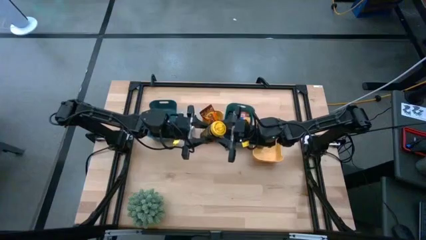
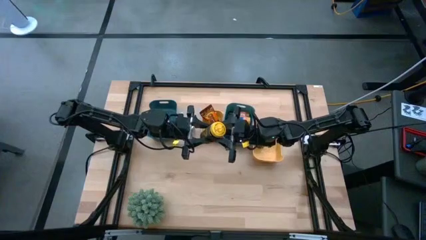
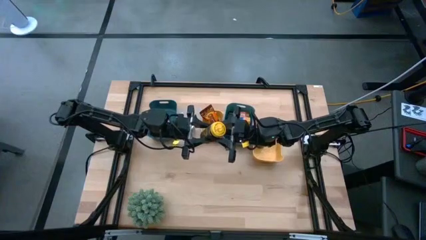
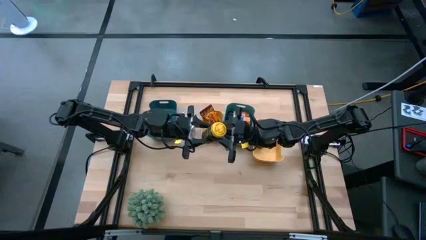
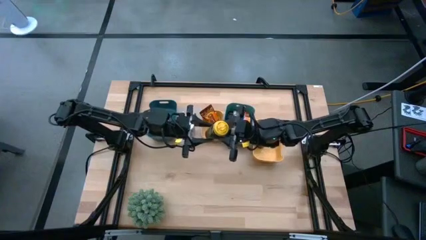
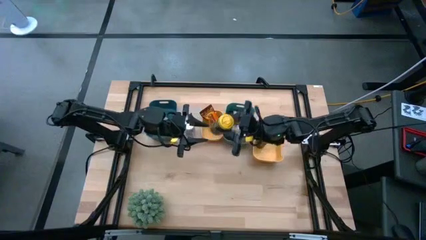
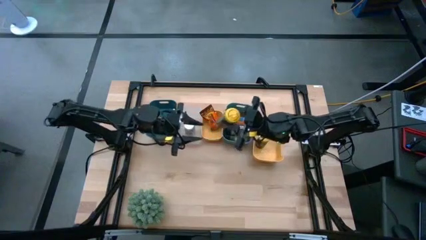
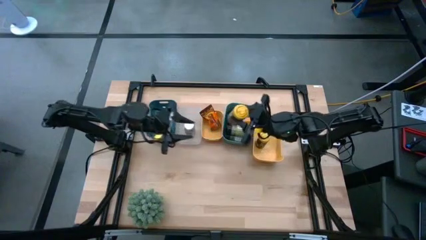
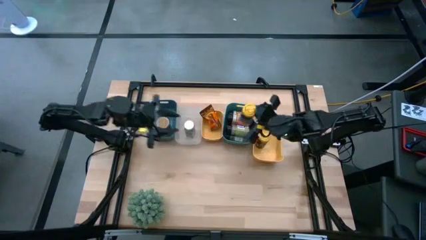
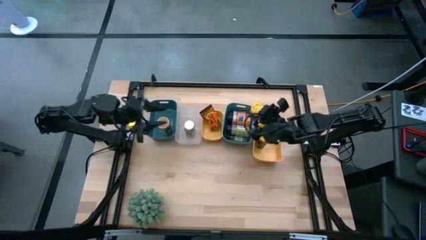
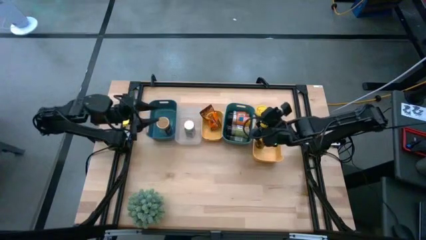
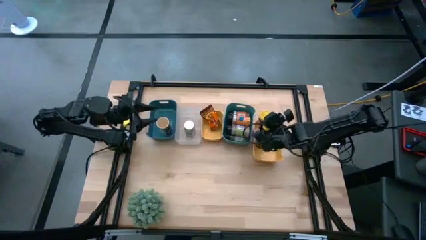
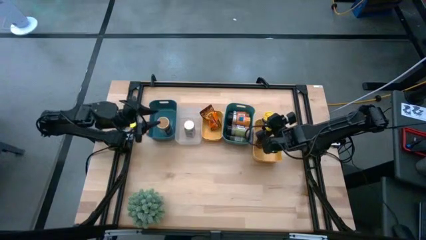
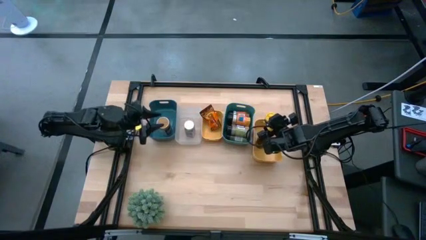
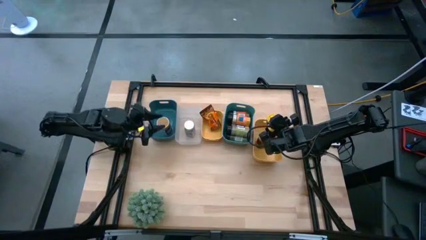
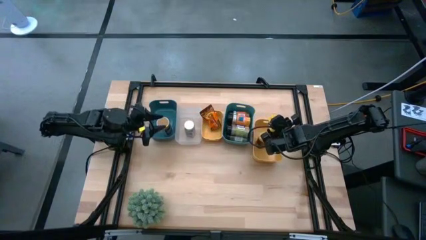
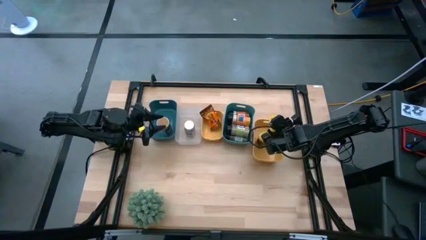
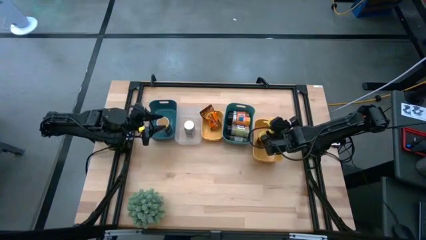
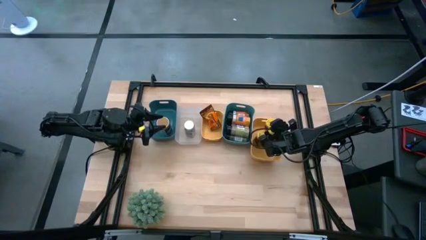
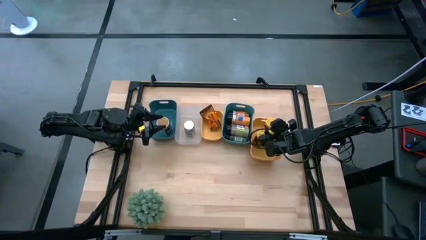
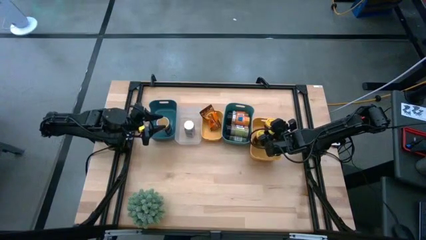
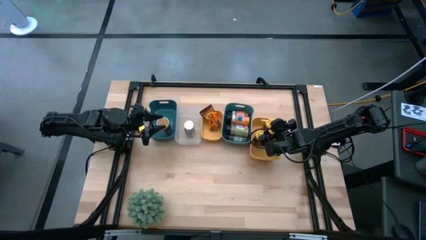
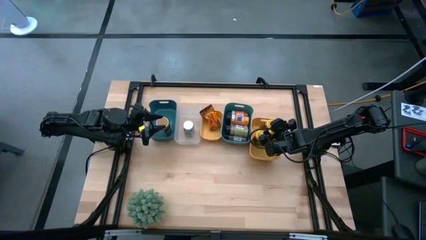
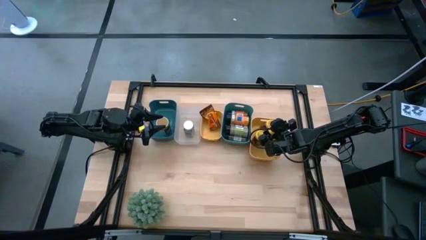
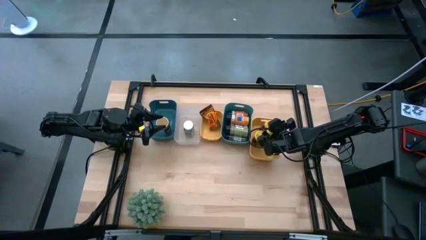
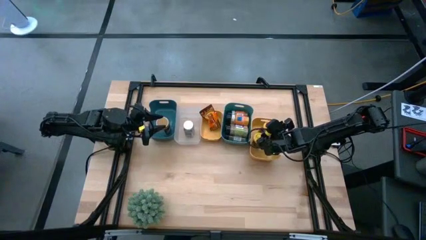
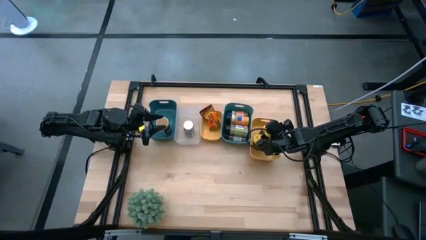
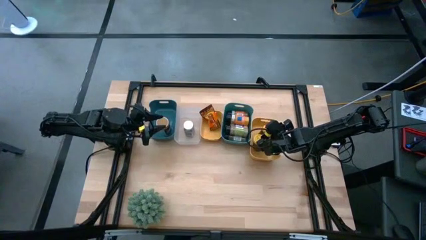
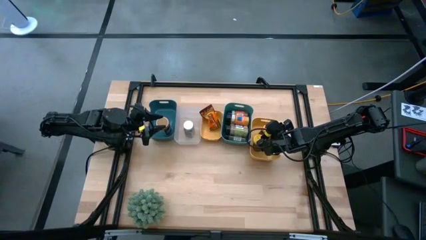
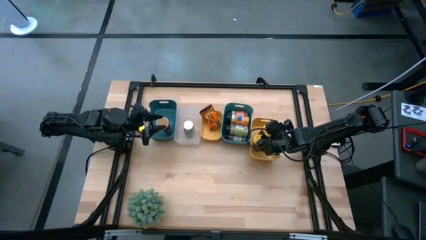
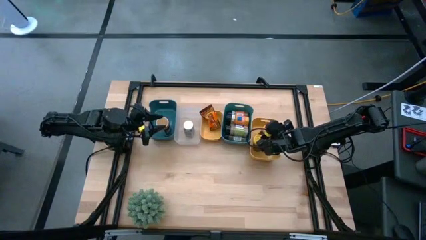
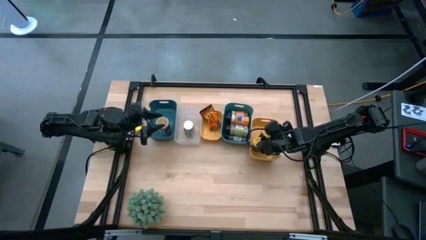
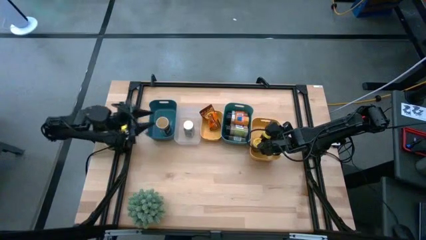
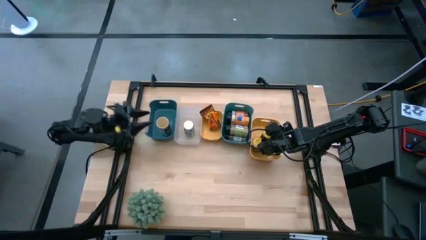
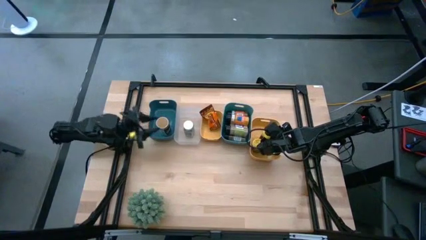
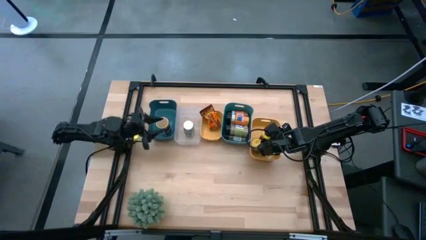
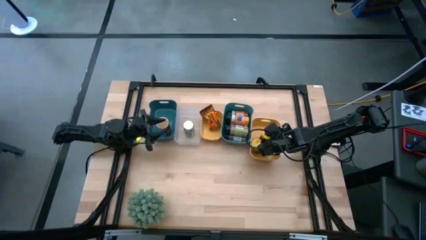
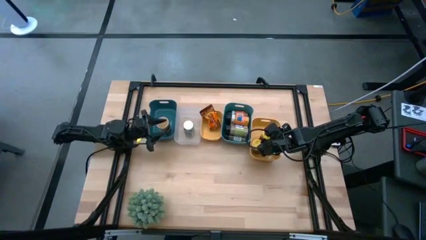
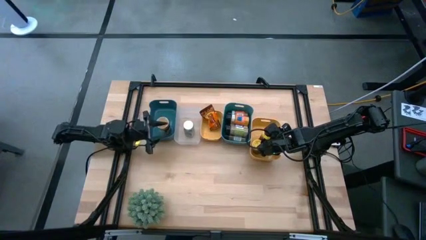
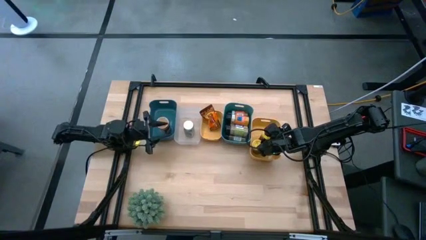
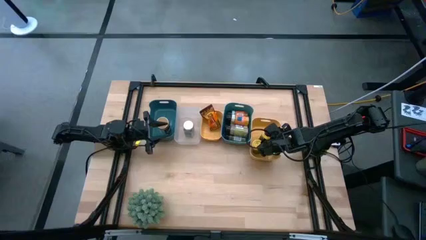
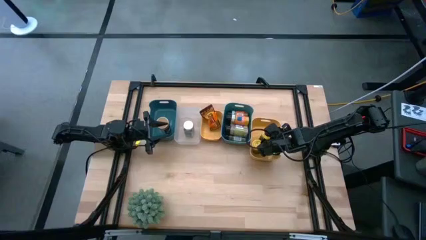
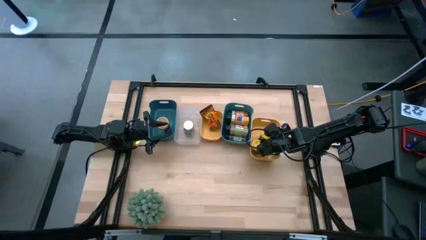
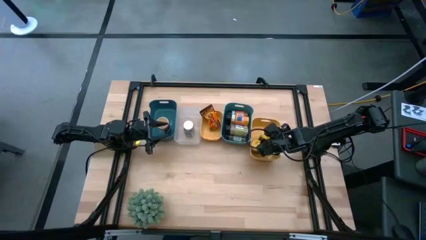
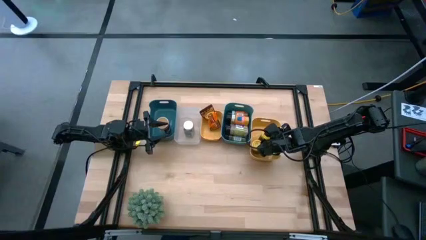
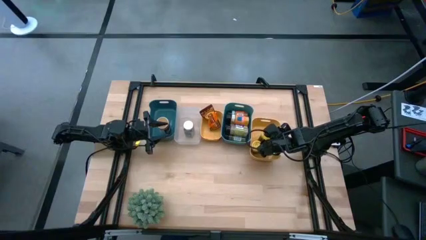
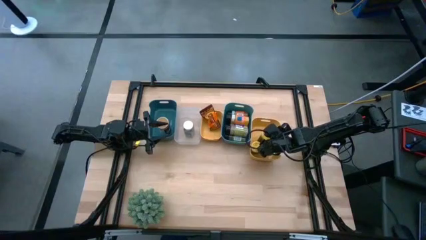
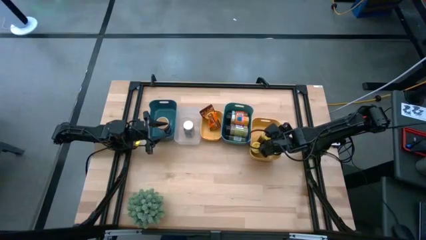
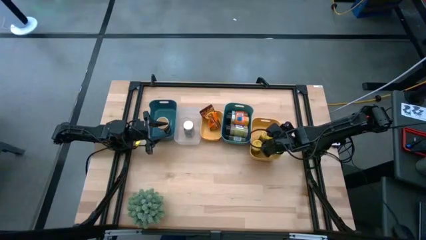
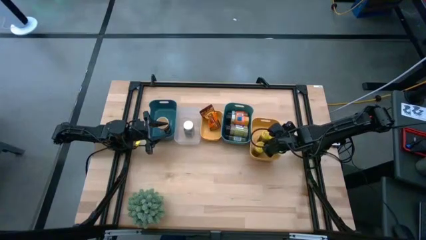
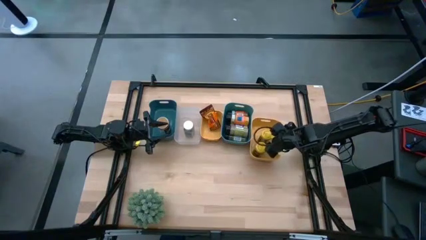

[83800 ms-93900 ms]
Task: Sort spices by type
Put the yellow seasoning can into the right yellow bin

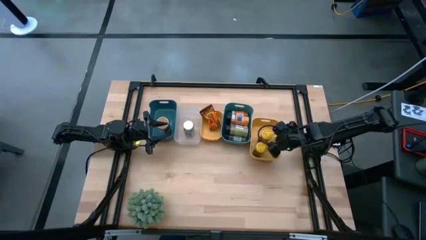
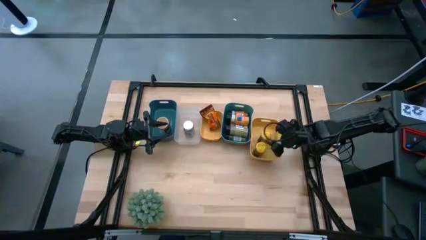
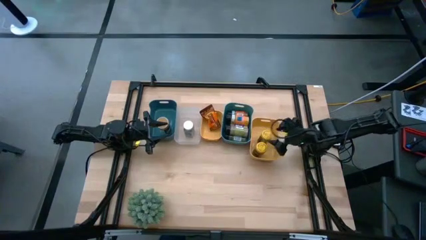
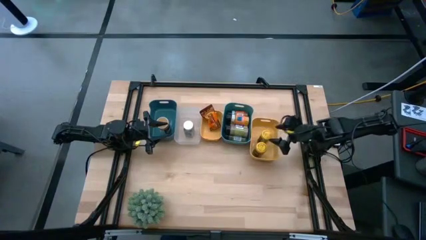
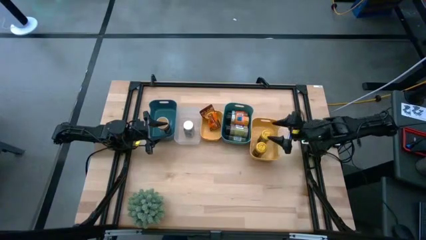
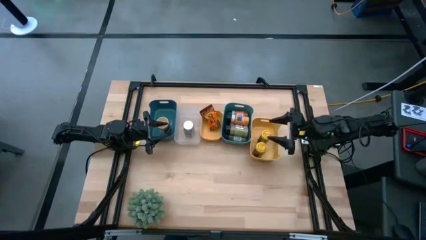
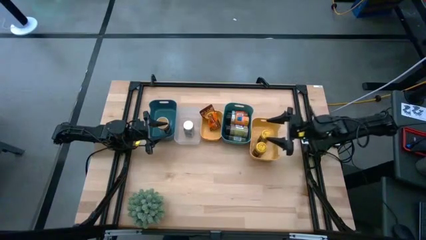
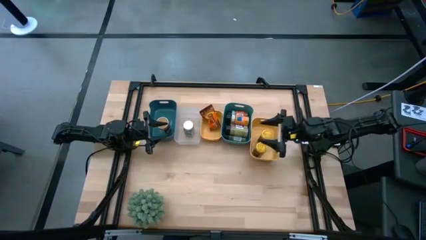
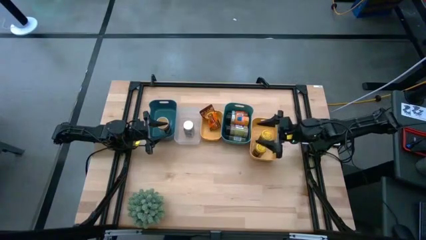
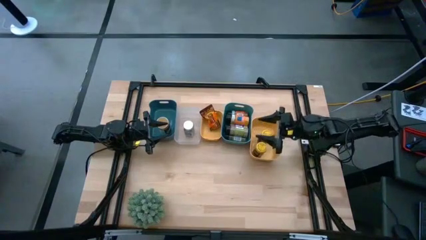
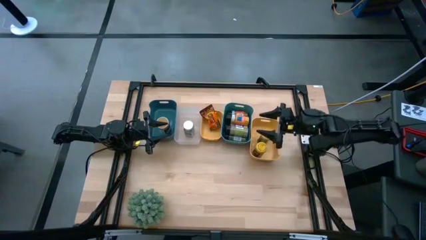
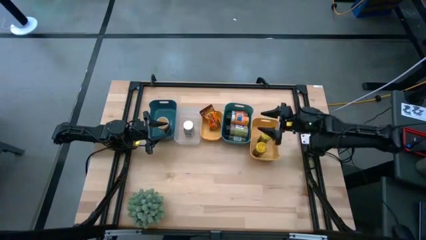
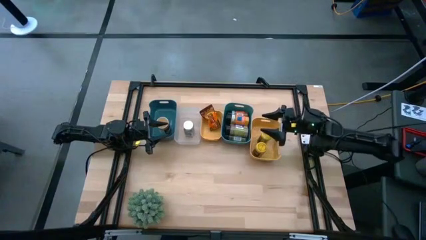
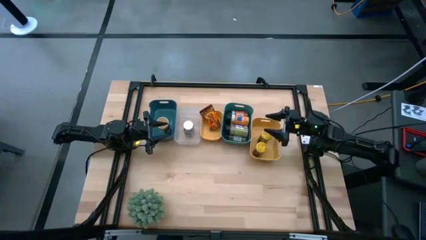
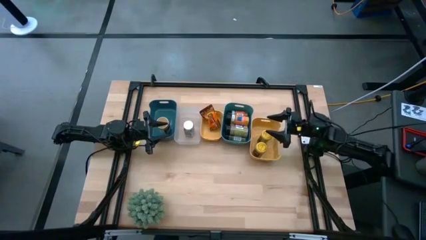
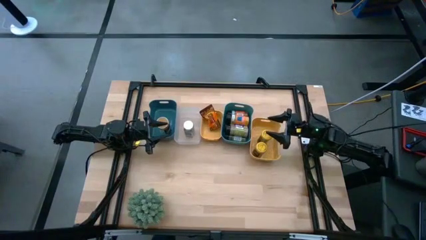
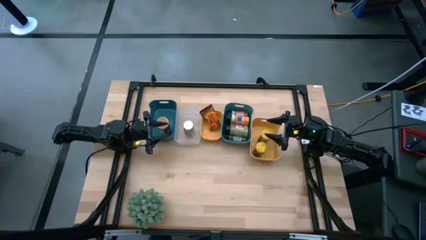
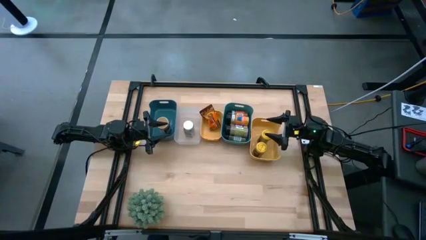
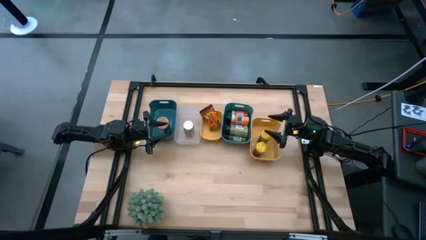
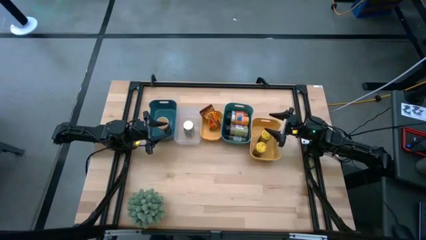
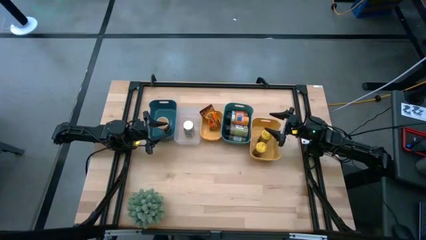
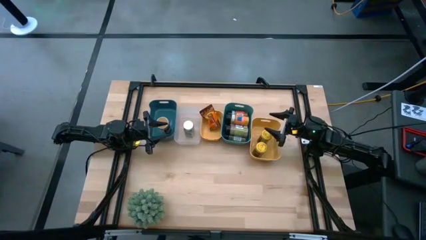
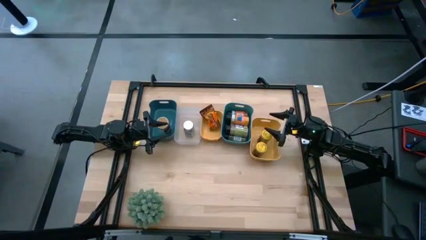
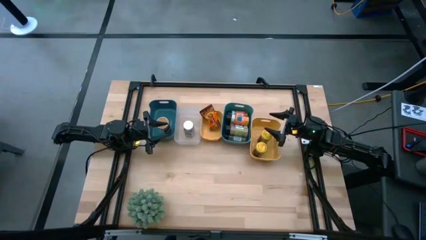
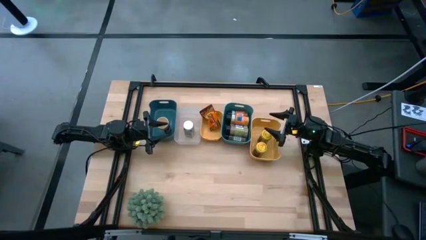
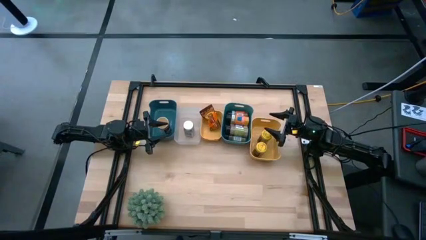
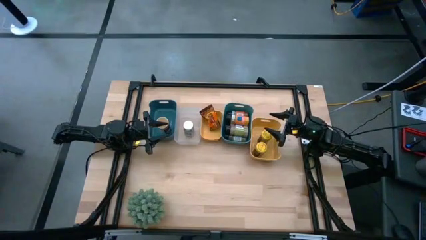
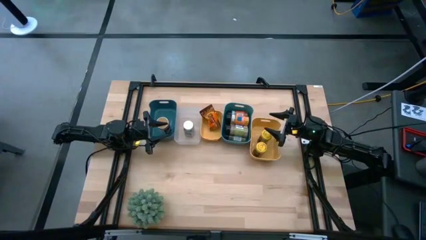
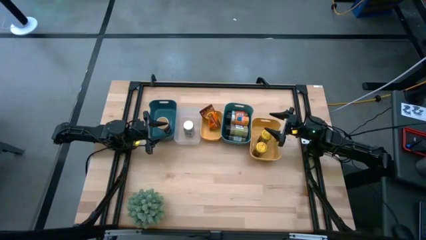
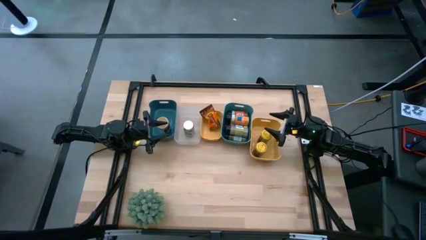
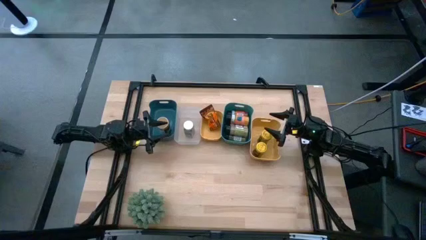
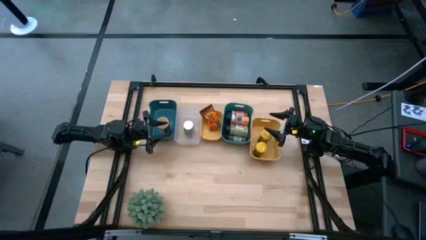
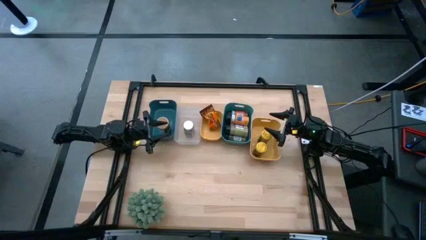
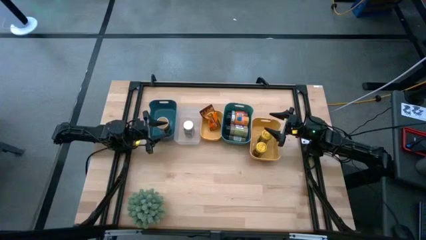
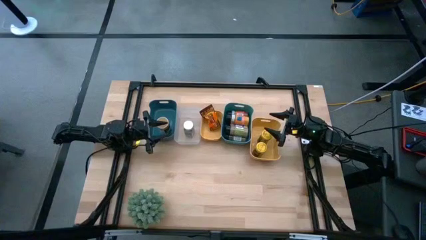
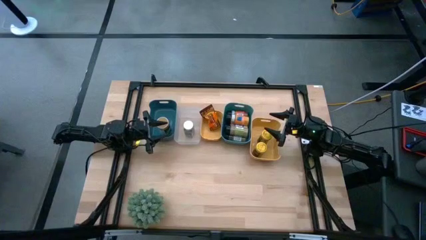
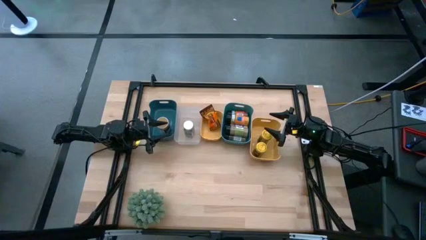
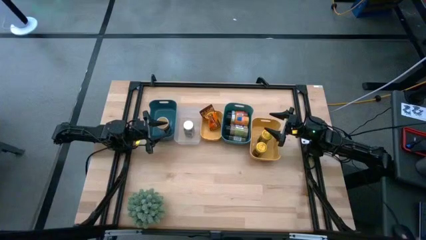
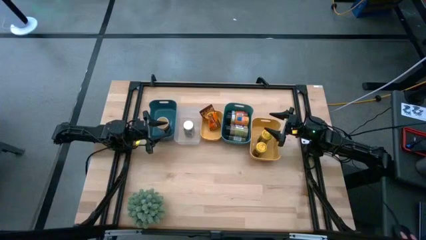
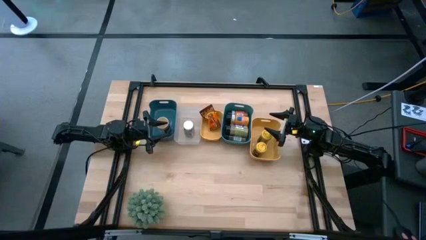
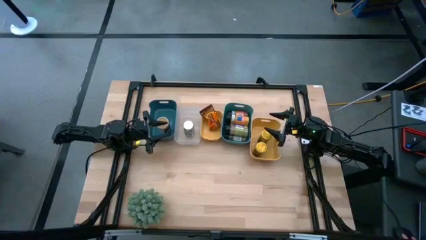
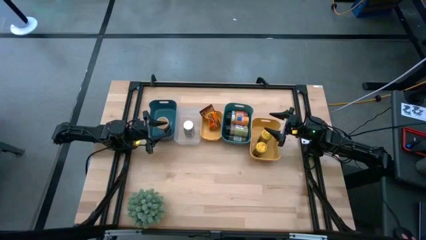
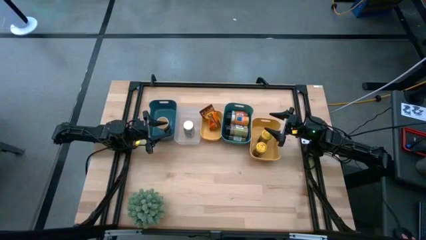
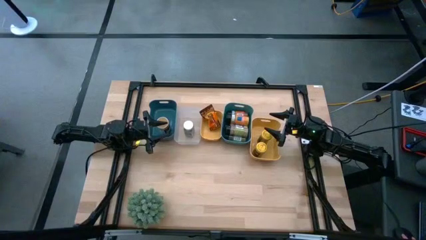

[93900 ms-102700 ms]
Return to Home Position
